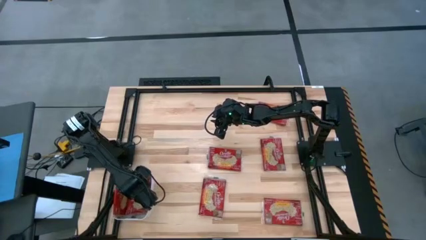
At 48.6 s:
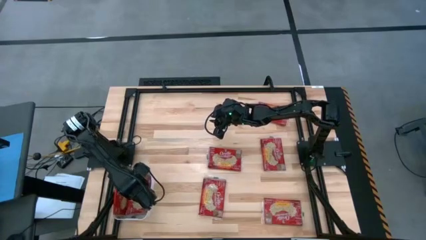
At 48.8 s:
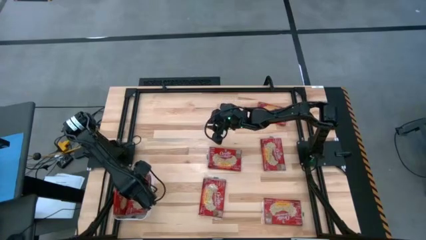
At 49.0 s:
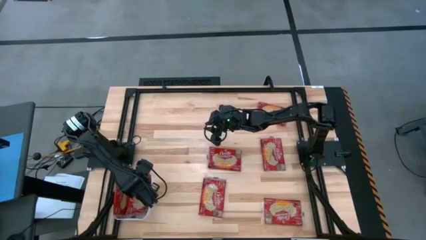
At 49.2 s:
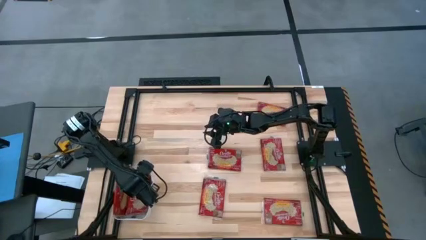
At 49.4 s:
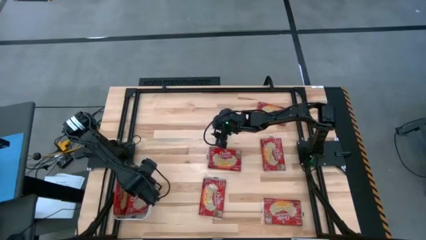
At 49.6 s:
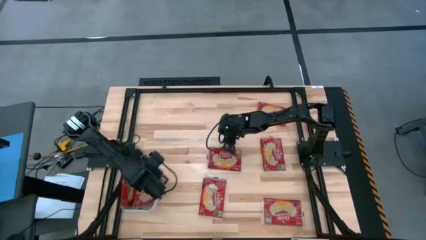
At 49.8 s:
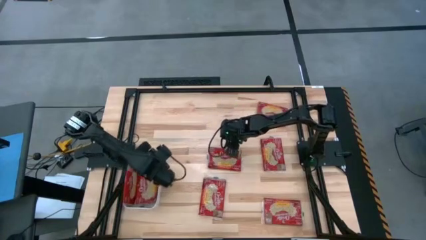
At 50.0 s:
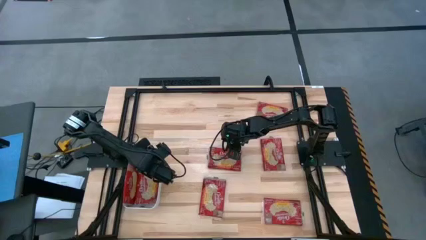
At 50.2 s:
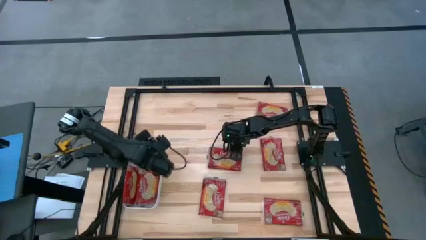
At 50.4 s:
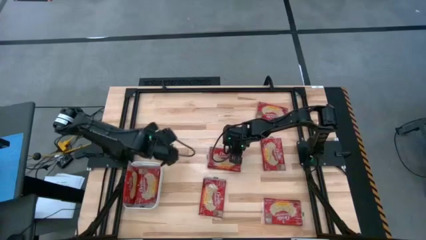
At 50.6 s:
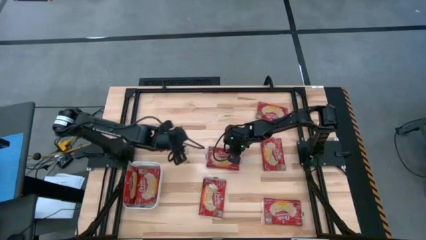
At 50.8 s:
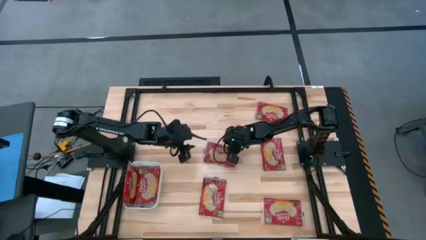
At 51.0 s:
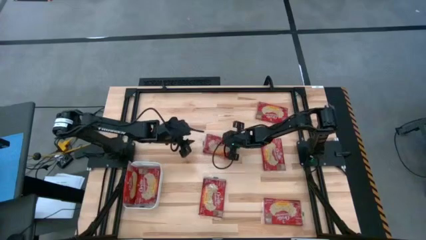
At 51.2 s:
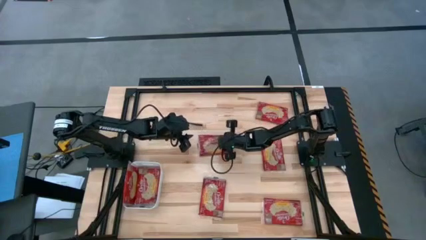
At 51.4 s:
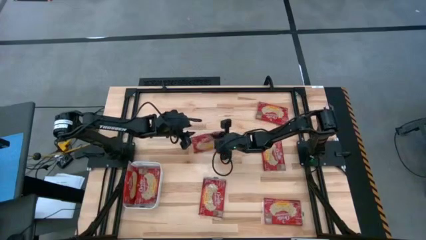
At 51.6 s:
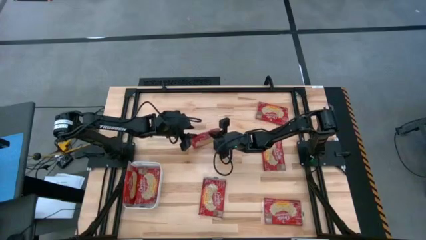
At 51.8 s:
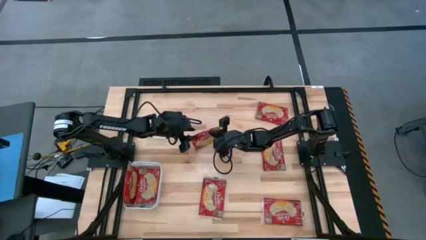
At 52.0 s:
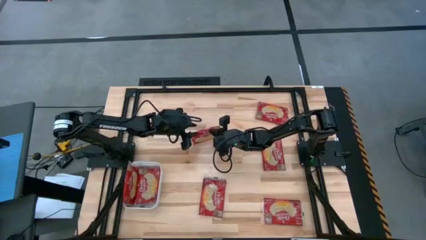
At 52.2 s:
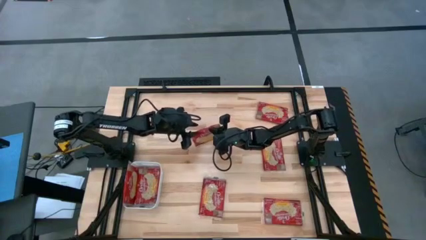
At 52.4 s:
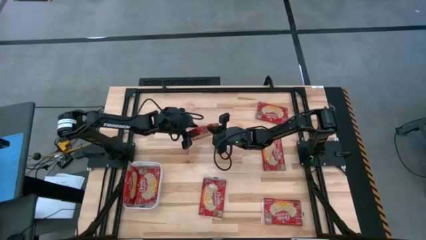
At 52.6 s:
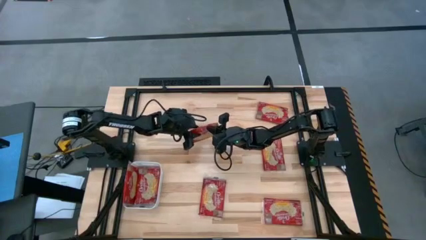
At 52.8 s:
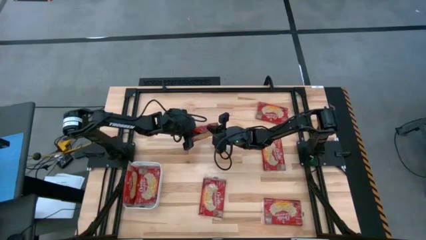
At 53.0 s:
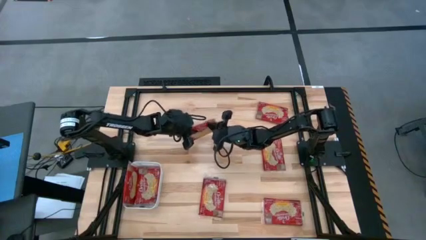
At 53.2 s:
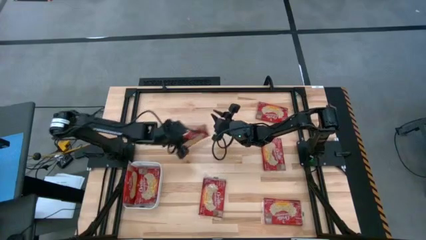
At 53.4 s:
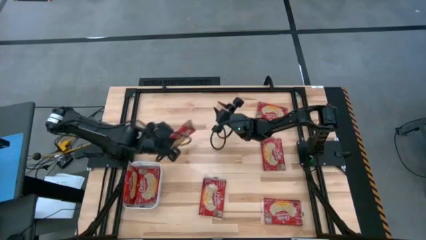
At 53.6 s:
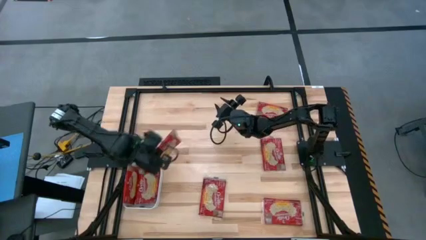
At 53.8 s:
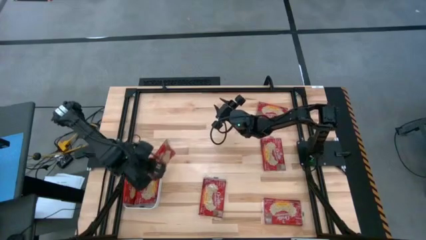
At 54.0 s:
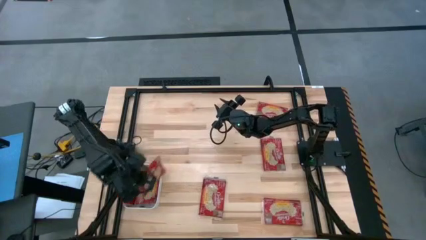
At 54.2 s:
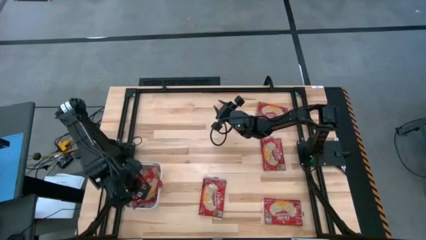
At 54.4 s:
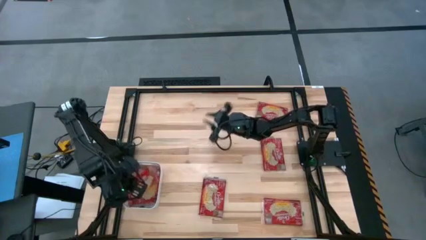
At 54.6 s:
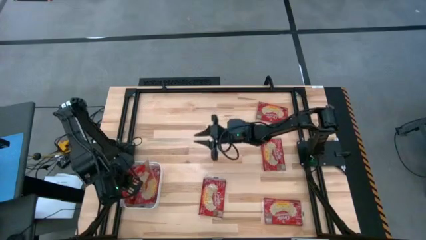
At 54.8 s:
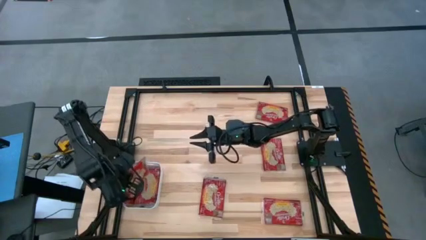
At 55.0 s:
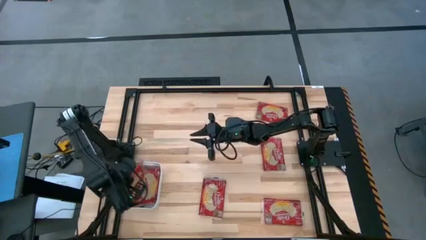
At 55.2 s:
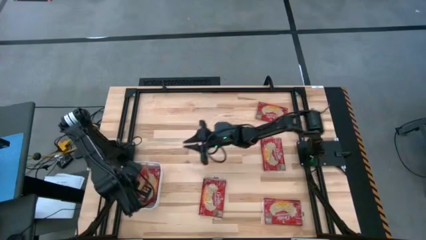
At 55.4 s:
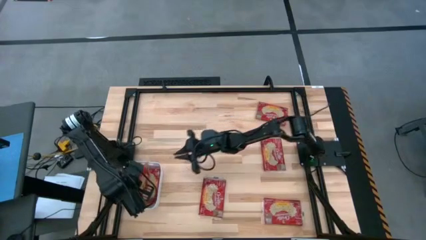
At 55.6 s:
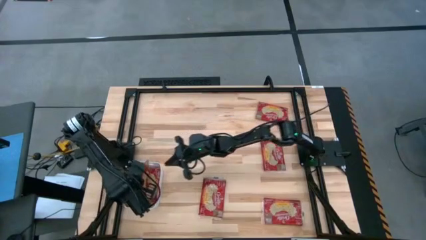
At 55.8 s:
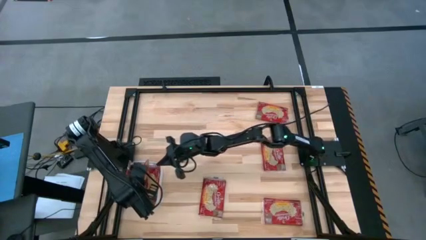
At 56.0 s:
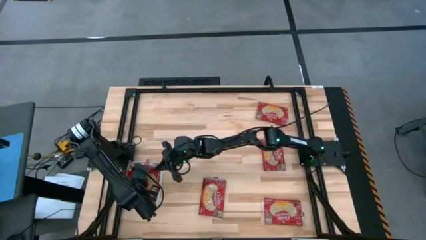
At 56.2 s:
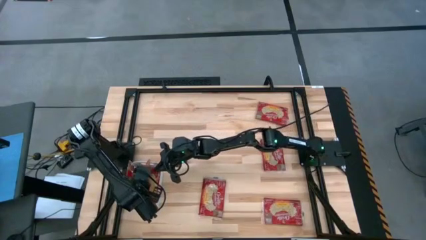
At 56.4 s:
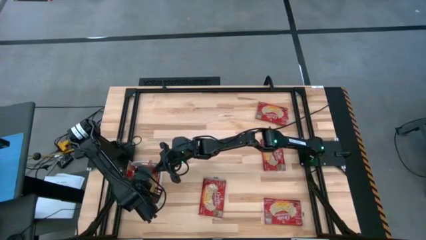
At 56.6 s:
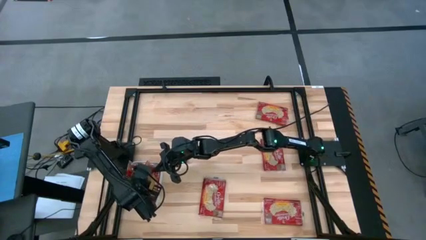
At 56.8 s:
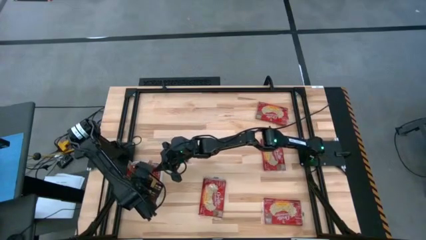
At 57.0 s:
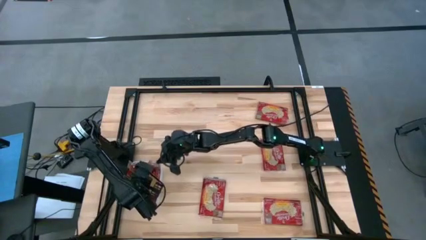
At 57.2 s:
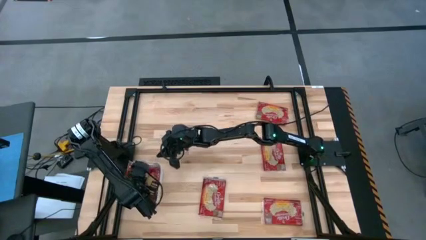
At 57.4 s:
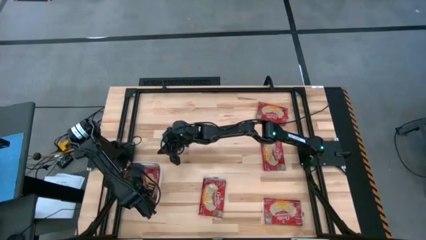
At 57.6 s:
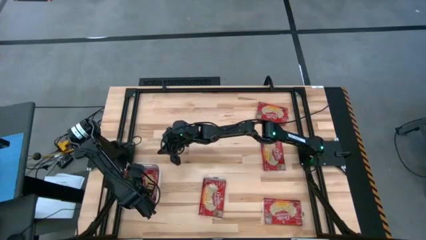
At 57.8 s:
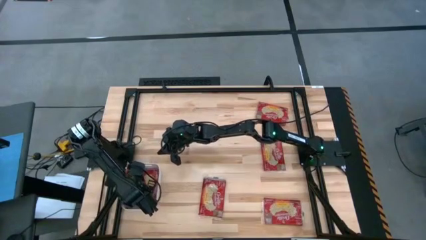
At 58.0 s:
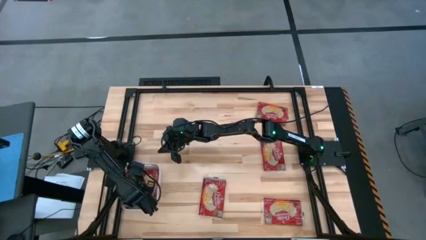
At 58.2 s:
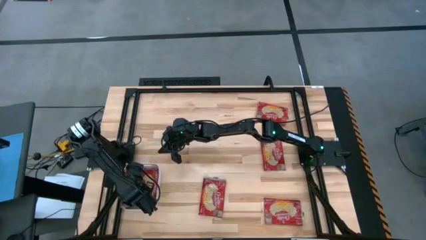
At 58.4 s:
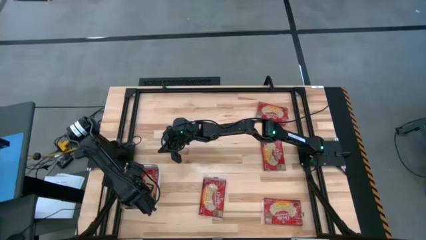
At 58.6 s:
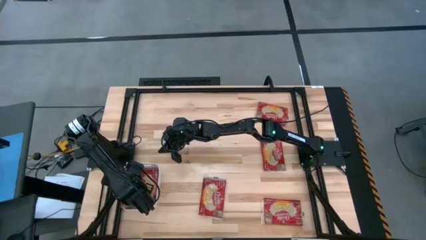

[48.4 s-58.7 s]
Task: Sort popcorn bags into baskets
Put the red popcorn bag into the white bin

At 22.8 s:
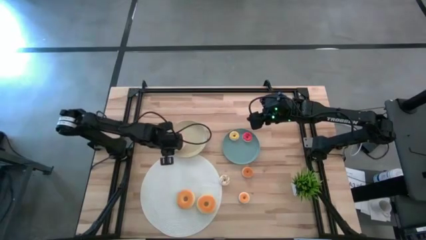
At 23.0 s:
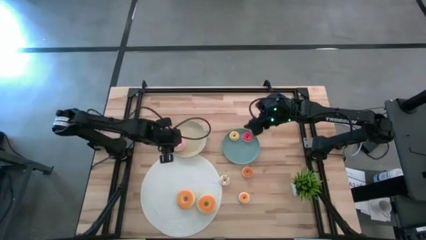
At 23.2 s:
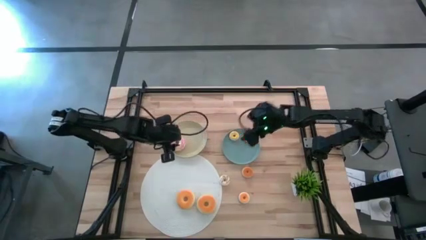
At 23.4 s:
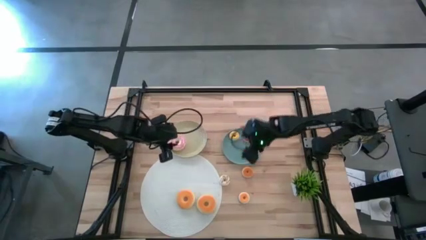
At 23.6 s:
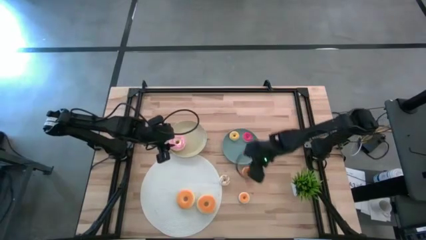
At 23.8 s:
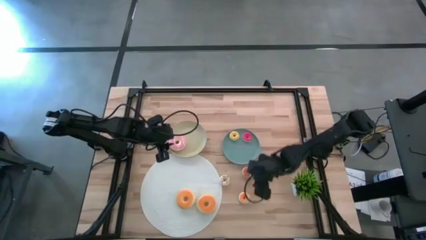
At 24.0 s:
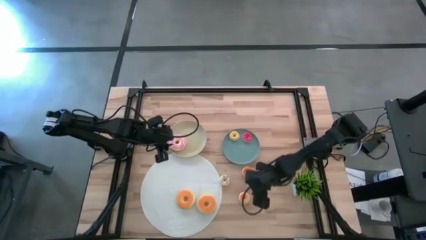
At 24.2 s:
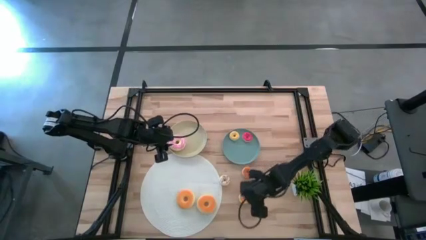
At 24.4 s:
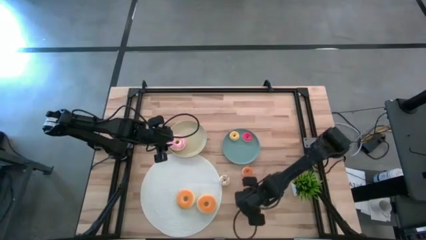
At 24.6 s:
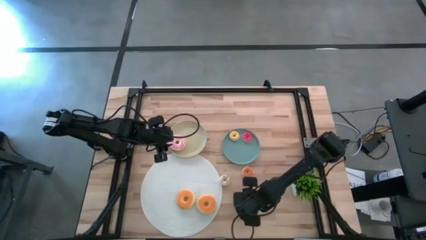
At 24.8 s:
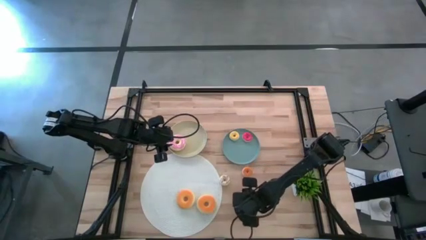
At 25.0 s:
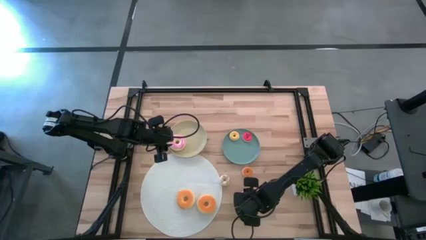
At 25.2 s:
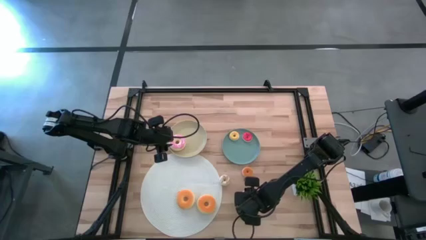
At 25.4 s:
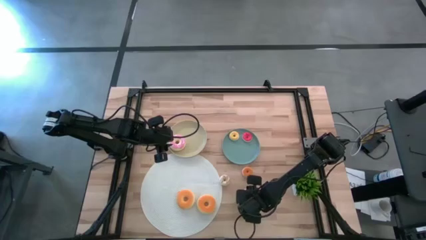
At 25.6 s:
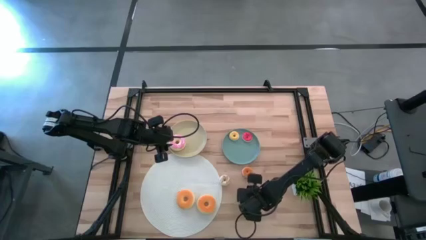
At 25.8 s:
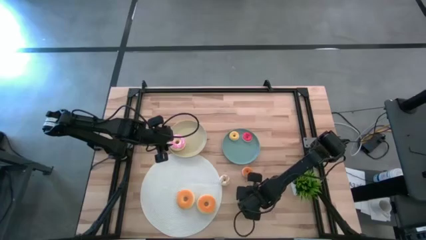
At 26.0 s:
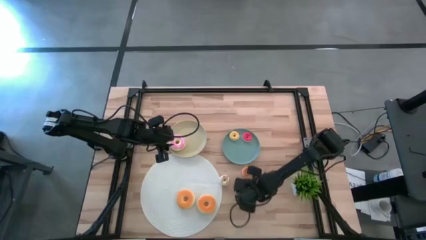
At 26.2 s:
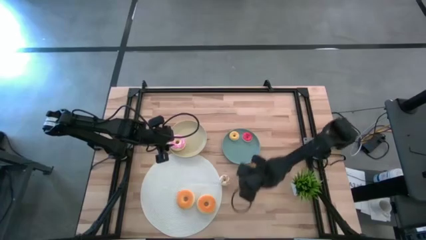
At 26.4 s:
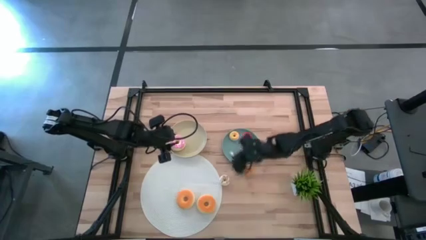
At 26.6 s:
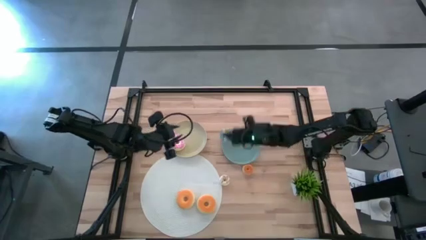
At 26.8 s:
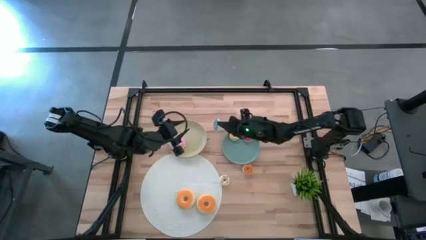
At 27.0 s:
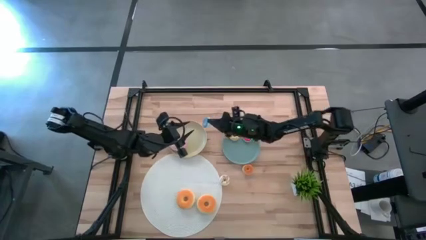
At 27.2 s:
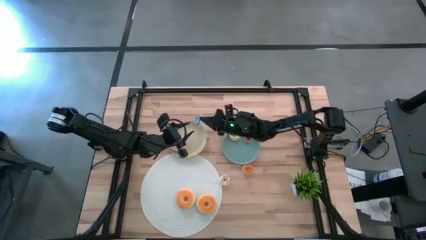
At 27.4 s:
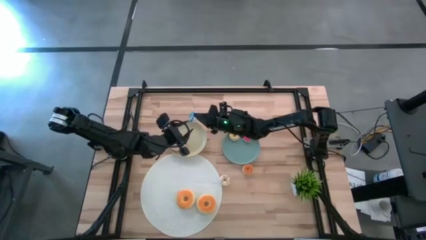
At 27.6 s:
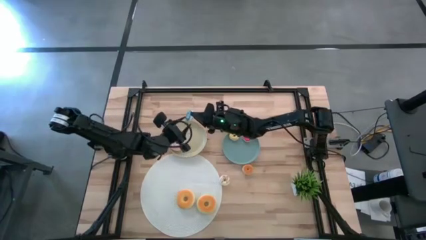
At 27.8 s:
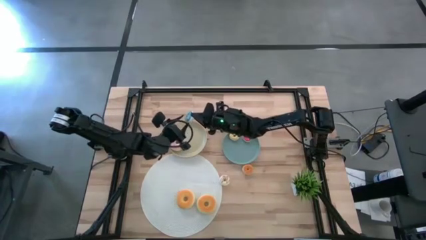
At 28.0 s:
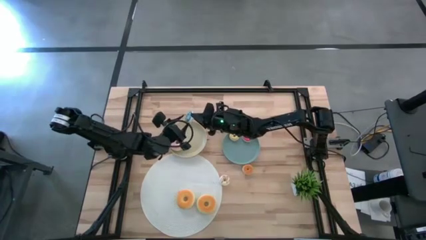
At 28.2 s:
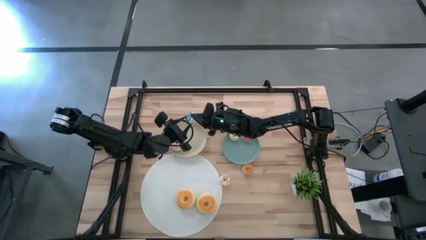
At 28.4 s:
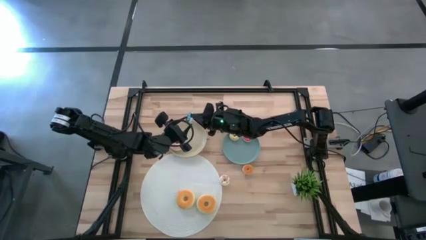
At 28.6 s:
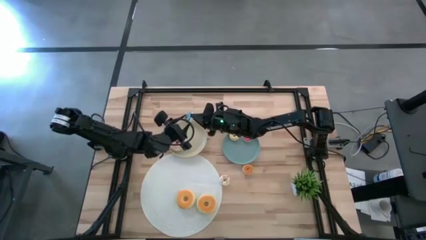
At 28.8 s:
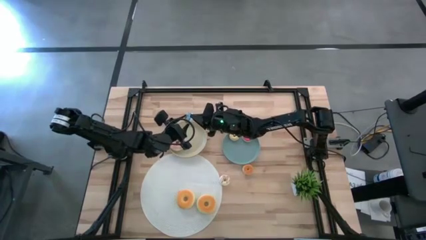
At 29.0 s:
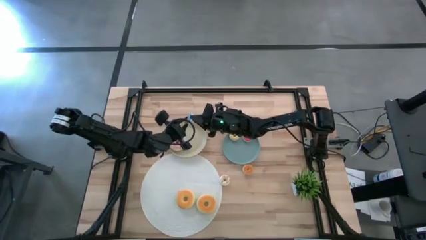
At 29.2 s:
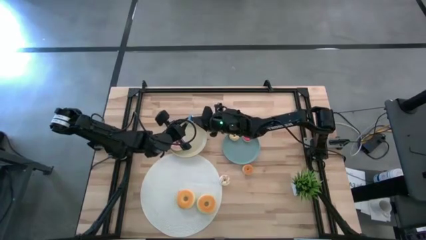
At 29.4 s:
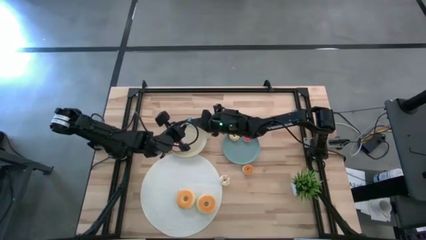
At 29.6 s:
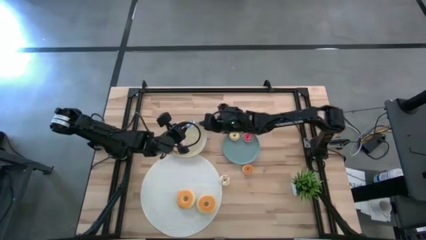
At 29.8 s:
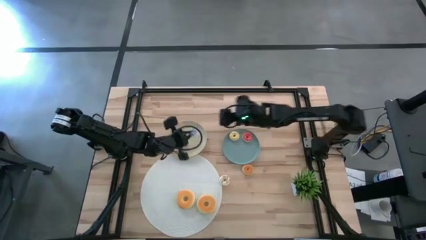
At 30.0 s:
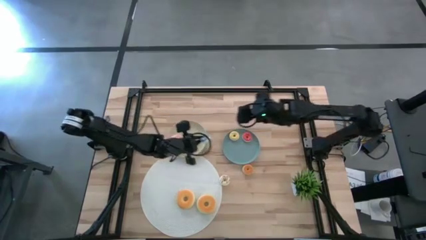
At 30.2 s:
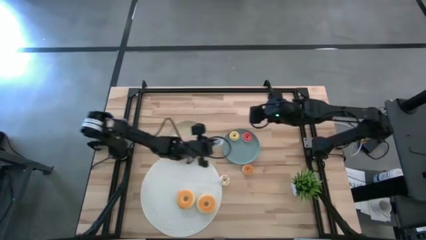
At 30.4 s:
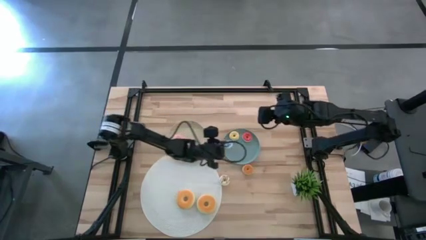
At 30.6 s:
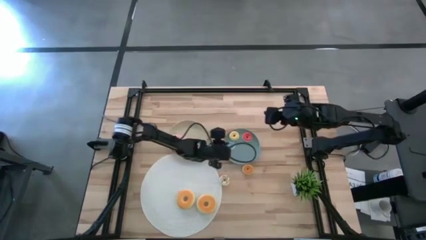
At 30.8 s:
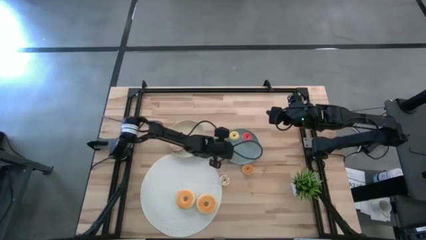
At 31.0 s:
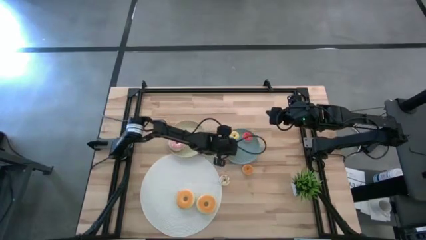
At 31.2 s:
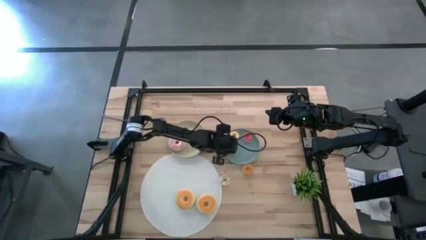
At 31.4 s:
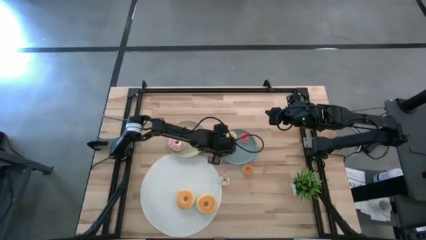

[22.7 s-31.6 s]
Task: Pick & Place donuts
Put the small blue donut on the blue plate
